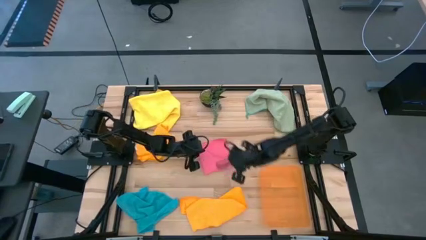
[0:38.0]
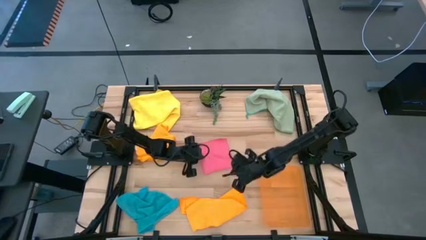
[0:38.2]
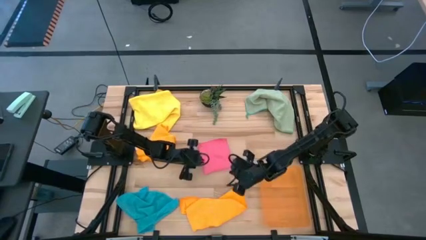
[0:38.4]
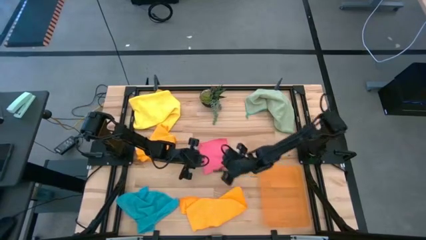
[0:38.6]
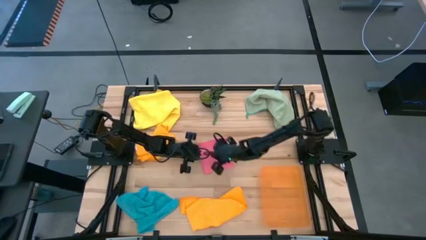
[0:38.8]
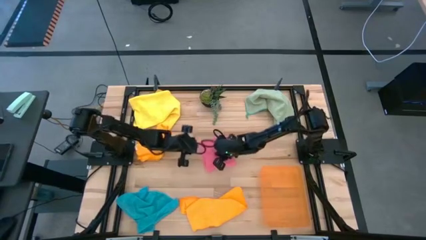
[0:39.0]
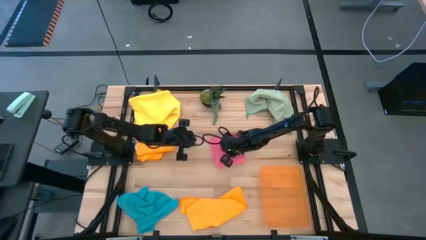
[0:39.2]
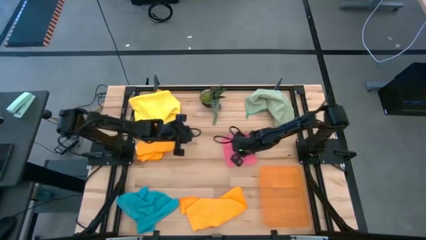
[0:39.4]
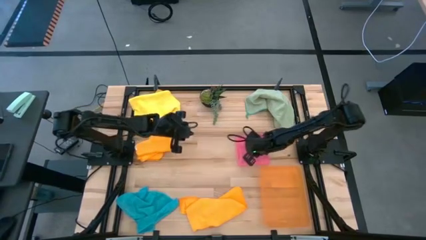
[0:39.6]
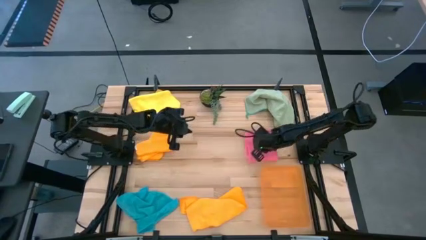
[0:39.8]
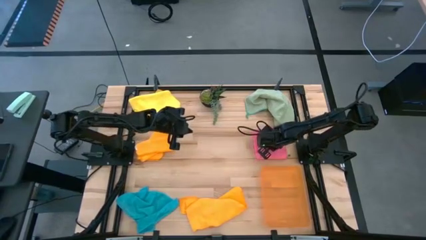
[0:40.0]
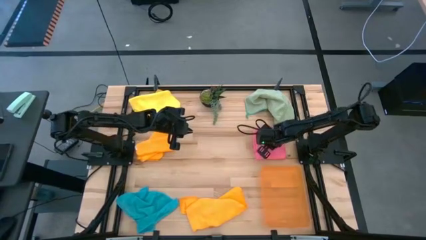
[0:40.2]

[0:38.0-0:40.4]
Task: Fold microfiber towels
Move the pink microfiber towel to the right side of the table

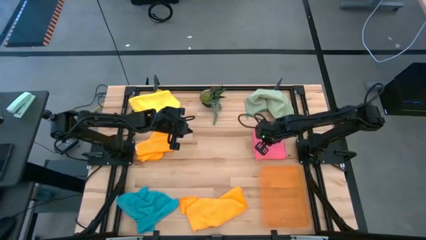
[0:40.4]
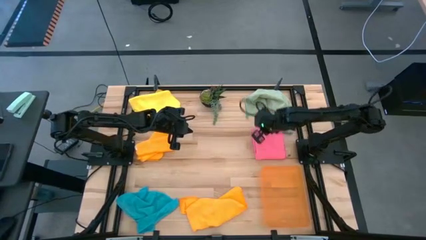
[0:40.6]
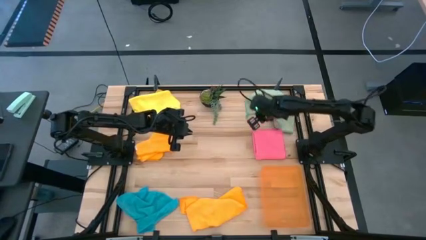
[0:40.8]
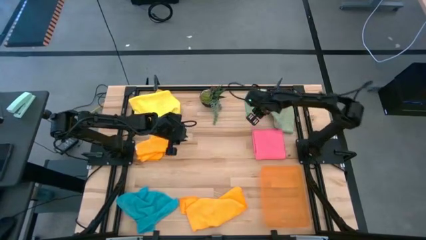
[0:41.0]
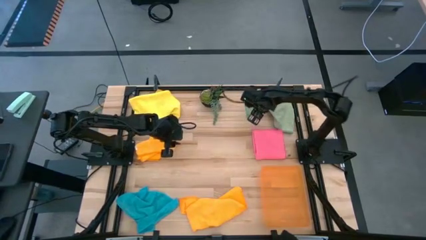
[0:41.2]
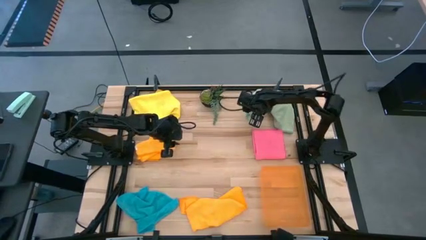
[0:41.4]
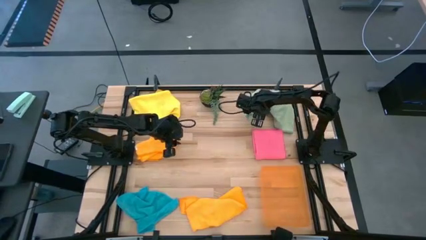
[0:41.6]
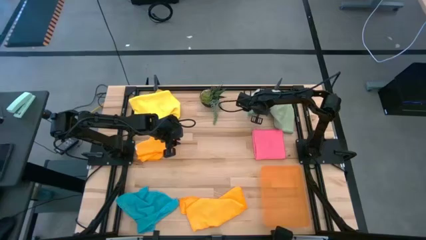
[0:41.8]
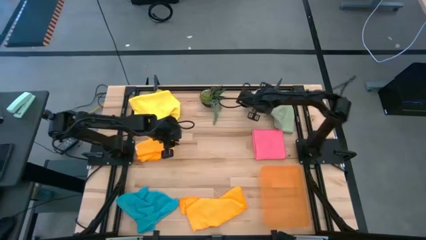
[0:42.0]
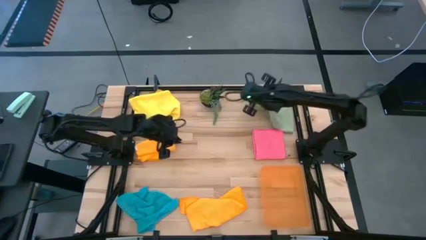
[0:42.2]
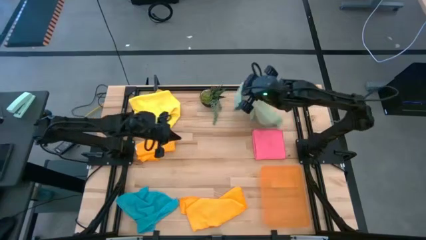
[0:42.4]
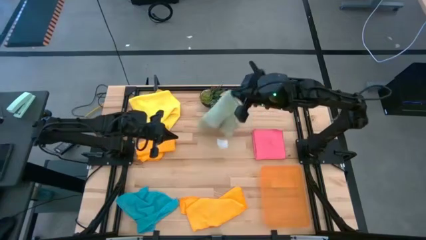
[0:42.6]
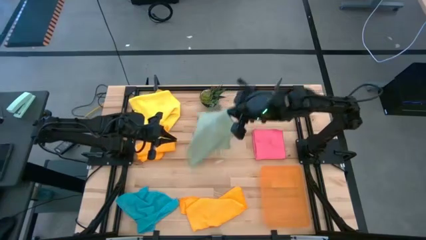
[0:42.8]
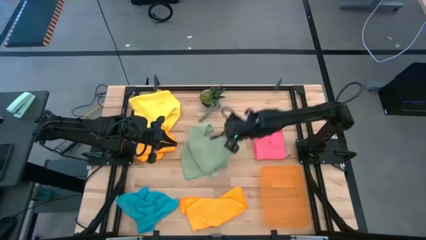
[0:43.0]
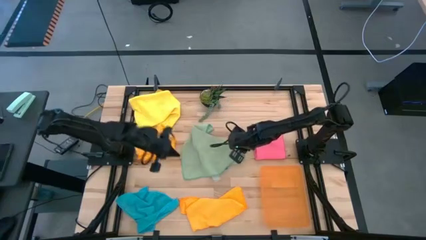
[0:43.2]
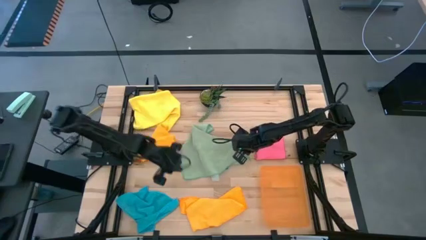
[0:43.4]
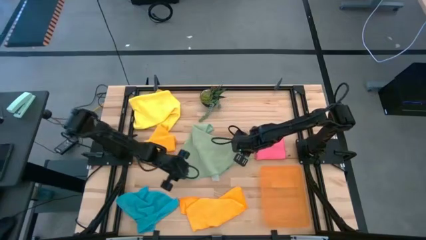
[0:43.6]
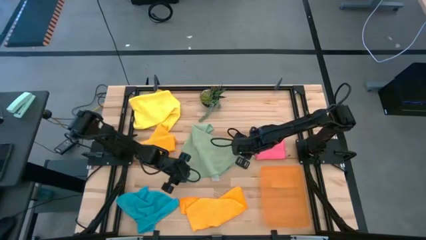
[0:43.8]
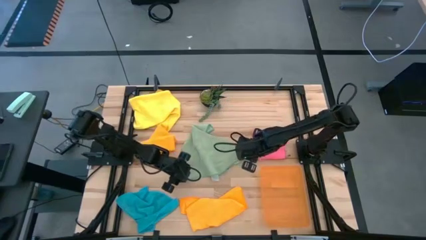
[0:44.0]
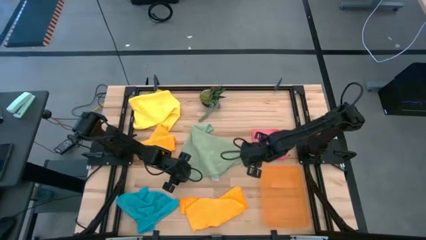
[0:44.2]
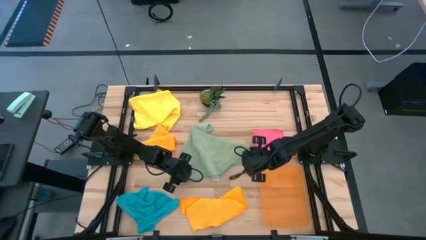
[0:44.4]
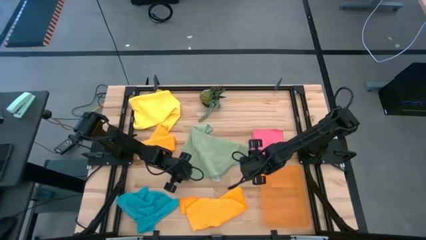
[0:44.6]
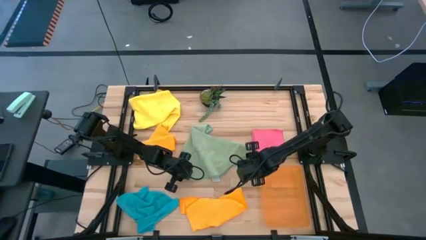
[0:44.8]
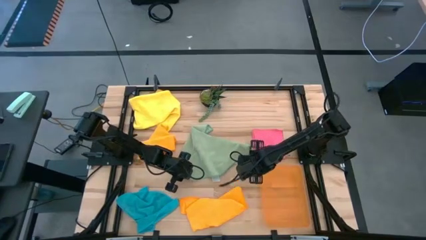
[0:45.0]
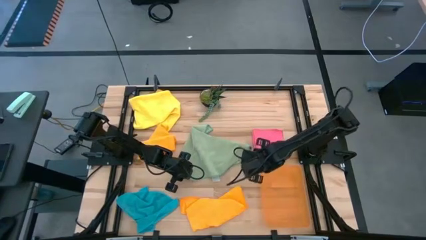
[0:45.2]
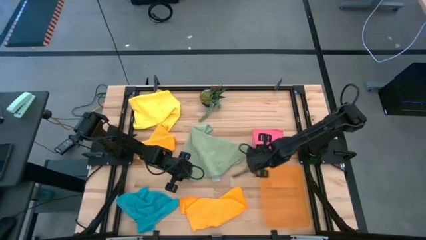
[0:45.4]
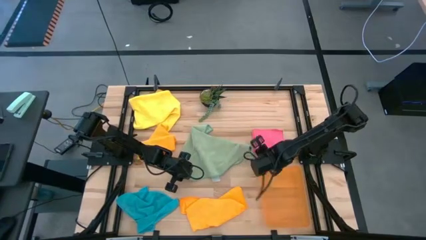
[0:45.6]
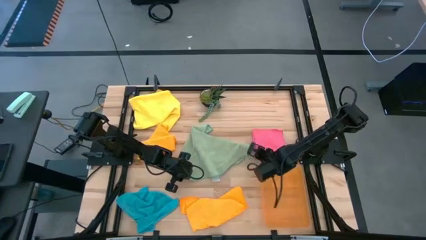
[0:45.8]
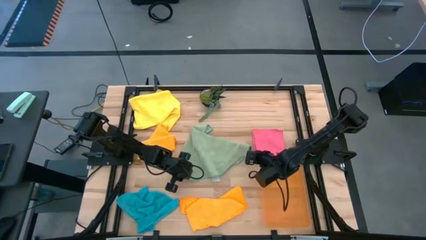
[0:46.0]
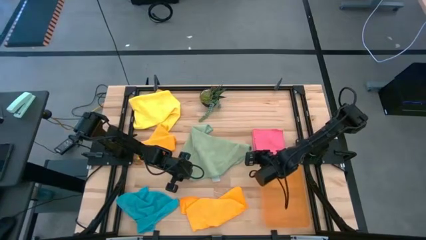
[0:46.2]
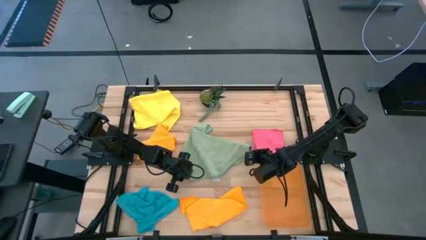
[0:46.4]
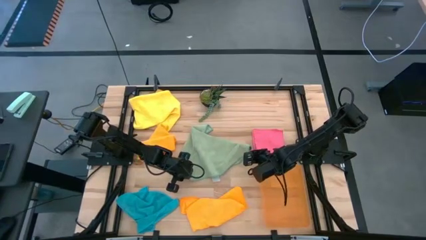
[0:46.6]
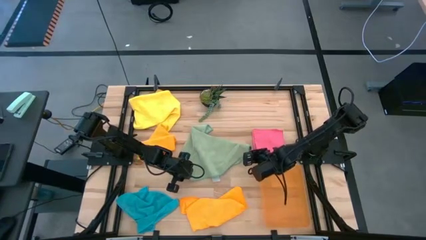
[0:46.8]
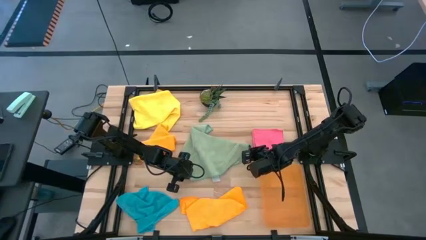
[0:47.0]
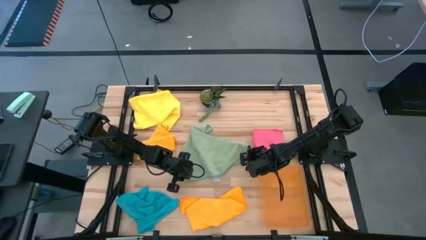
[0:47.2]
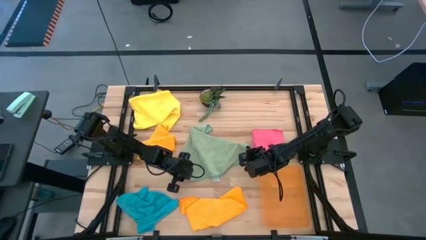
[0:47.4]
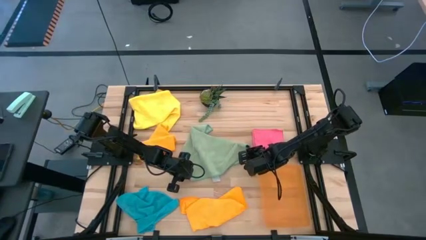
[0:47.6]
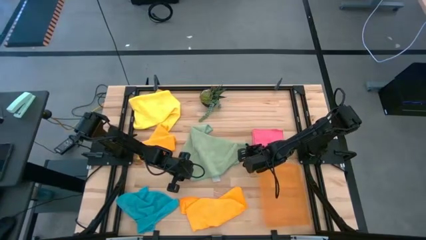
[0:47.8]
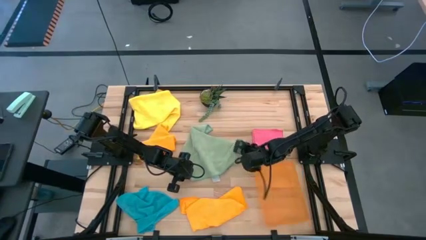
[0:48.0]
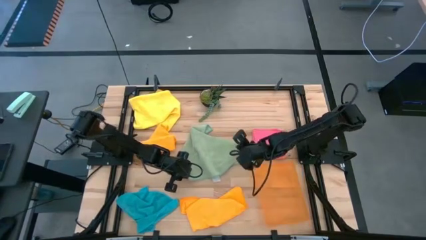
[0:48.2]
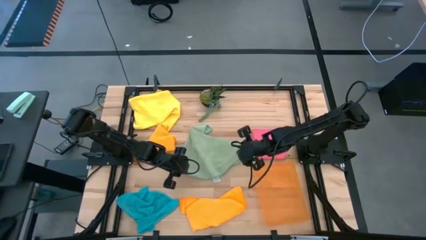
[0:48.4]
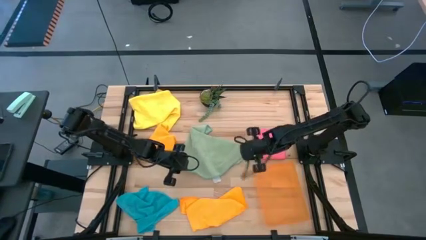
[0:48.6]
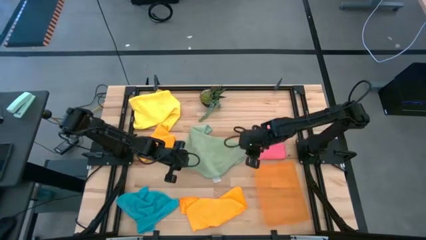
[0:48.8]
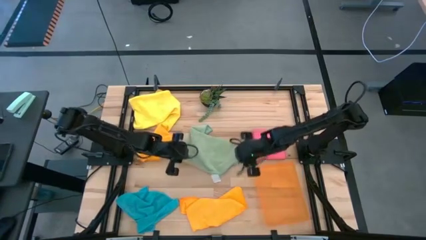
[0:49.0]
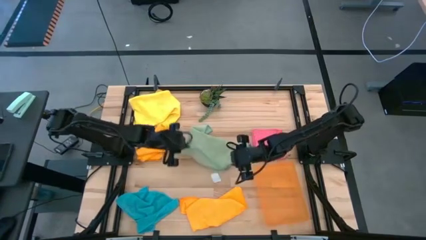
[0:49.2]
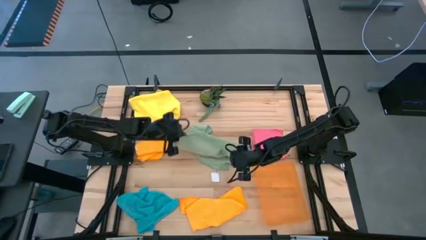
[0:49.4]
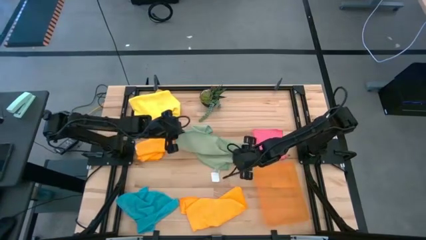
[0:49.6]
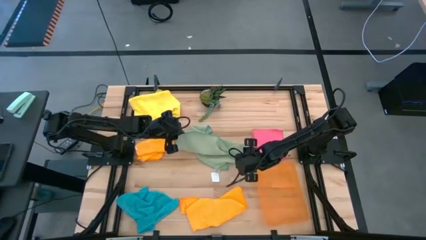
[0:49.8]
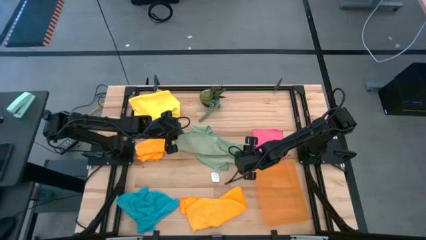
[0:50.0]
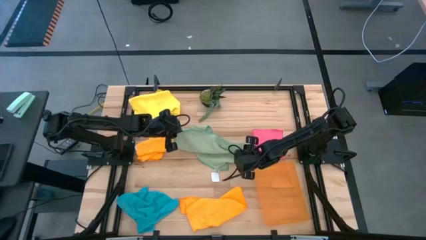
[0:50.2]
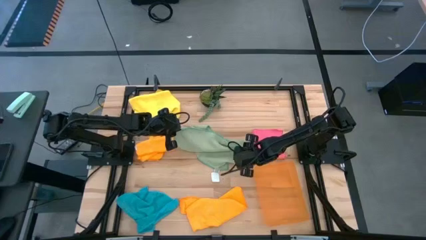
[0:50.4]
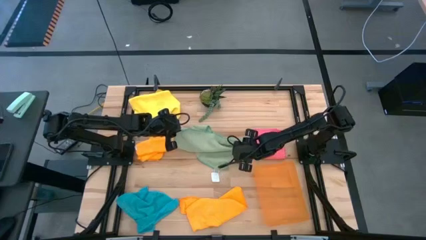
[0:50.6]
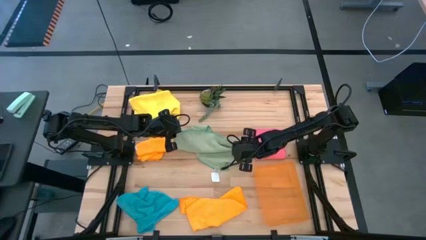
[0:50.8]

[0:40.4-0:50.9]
Fold the green microfiber towel

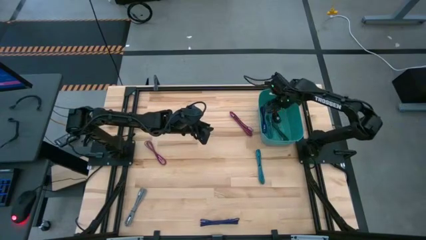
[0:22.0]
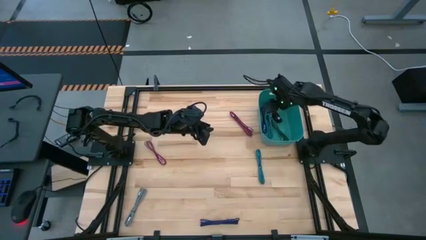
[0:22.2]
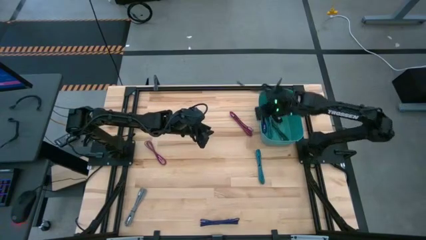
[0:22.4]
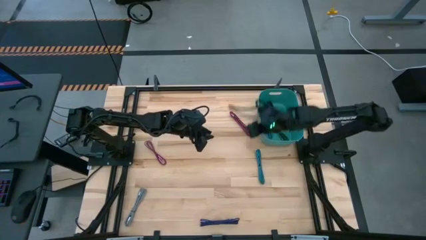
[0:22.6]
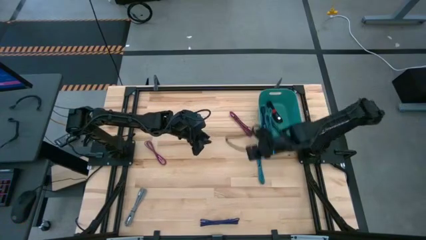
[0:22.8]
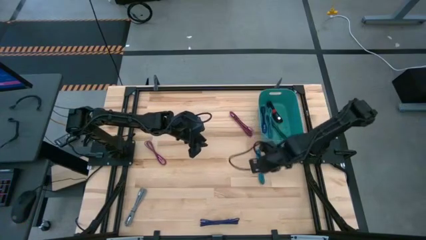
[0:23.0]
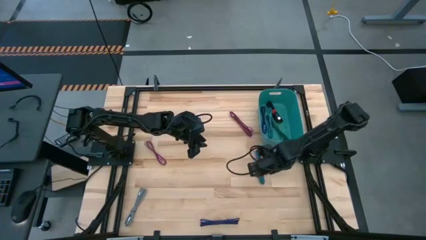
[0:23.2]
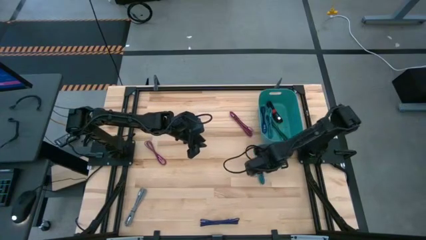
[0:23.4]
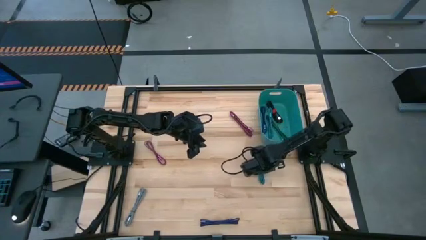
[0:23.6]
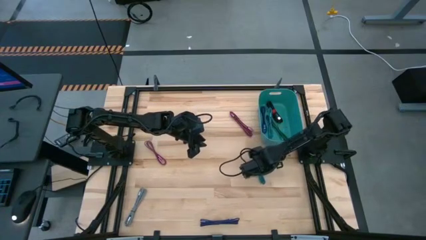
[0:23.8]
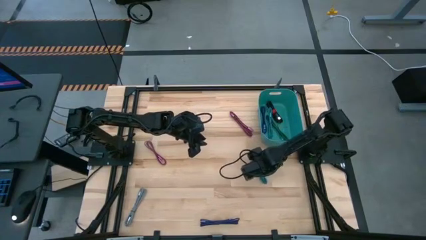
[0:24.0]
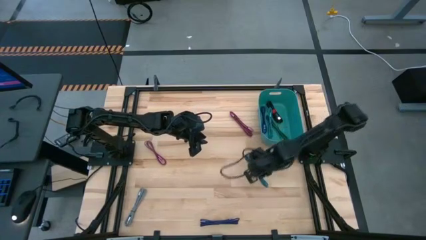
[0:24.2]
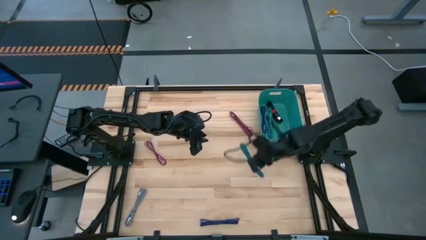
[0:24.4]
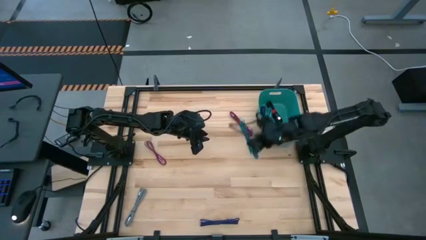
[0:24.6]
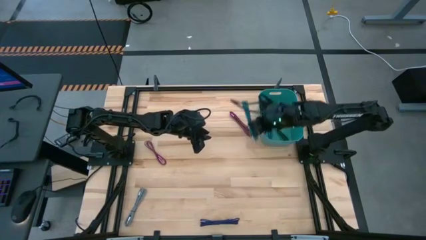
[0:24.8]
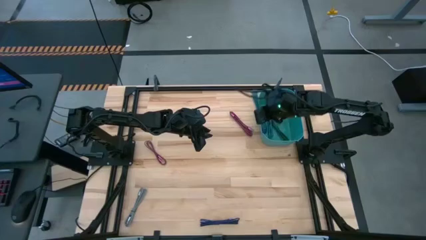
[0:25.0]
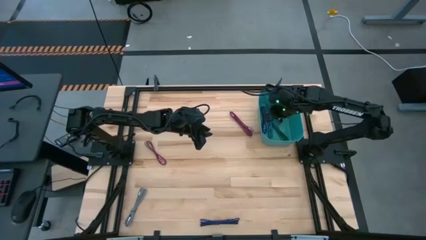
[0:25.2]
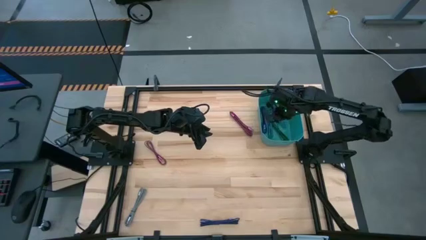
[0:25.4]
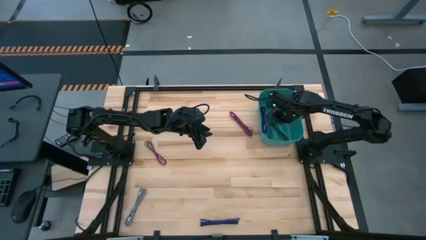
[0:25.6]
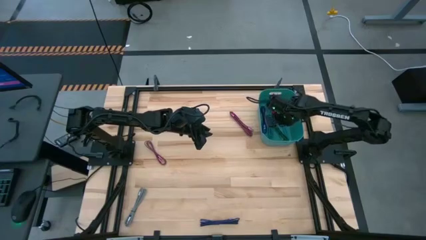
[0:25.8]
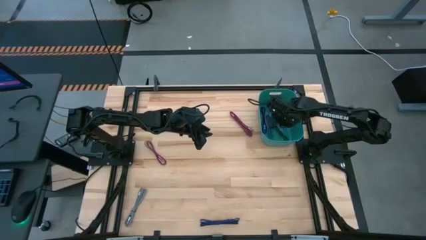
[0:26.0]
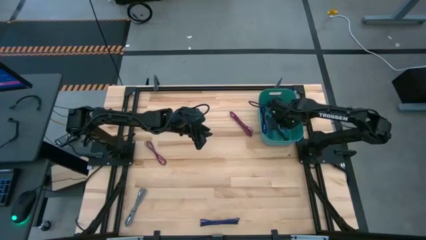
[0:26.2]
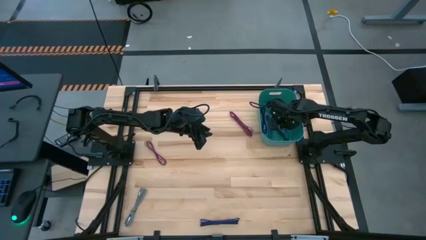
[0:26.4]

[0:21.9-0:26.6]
Task: Pick and place USB-C Cables
Put the green charger cable into the green bin
